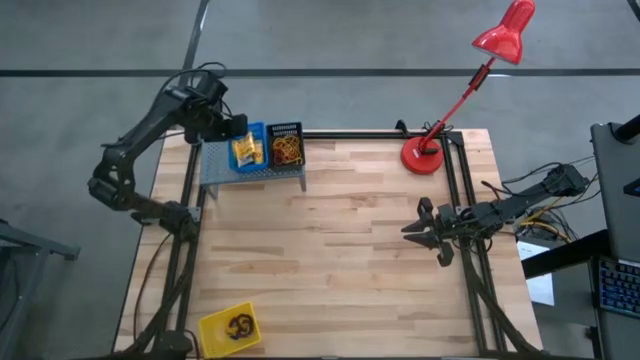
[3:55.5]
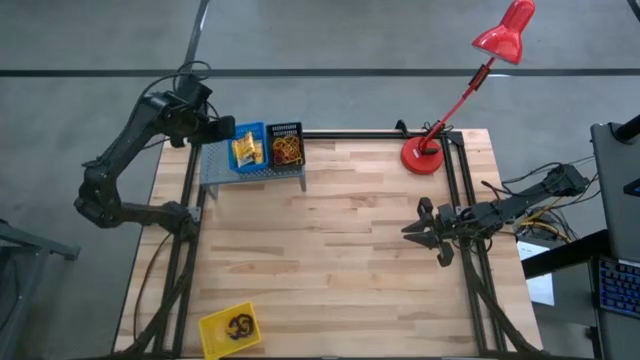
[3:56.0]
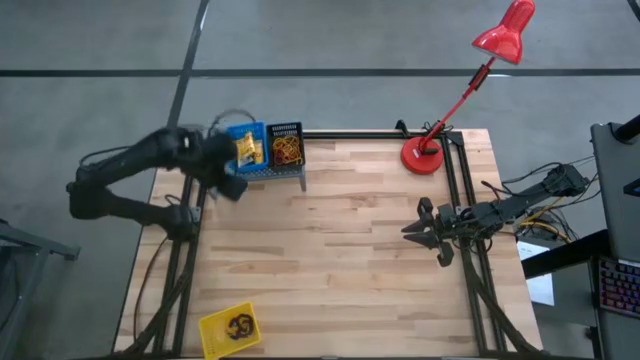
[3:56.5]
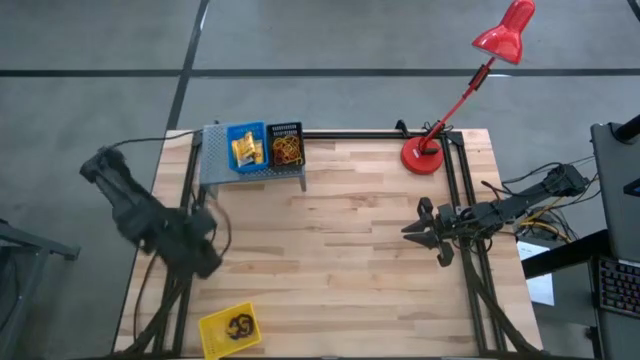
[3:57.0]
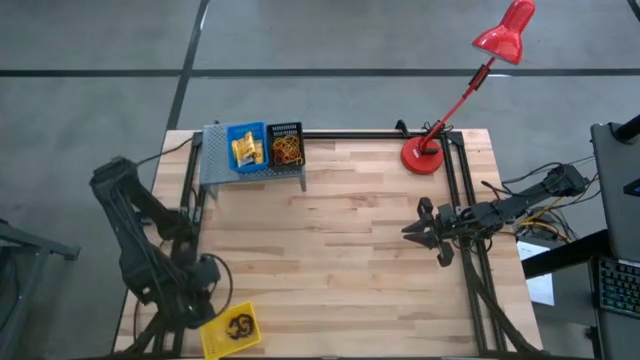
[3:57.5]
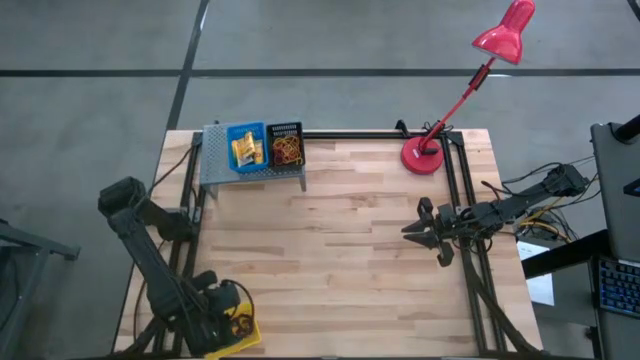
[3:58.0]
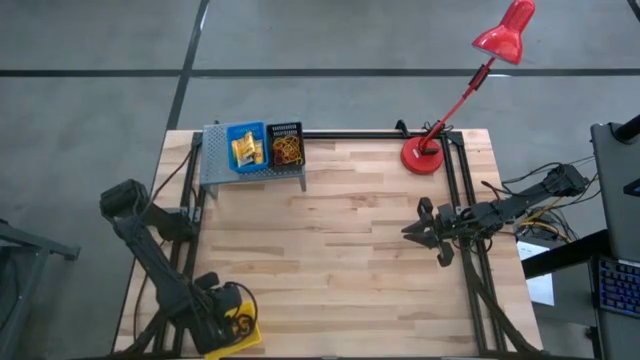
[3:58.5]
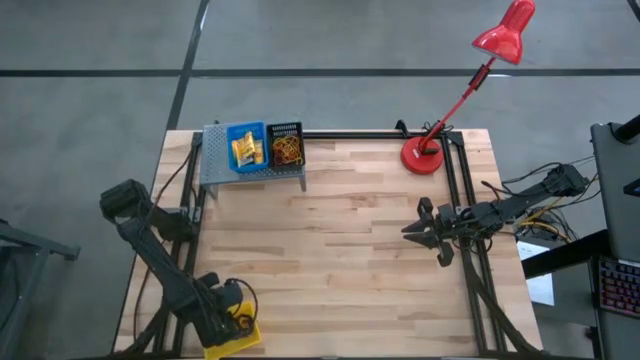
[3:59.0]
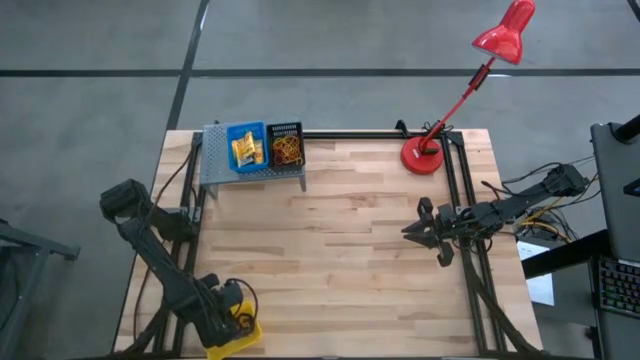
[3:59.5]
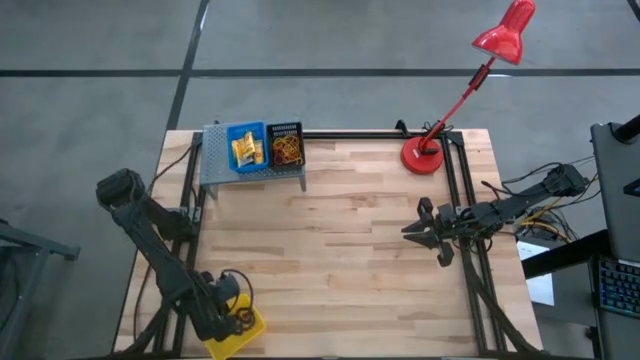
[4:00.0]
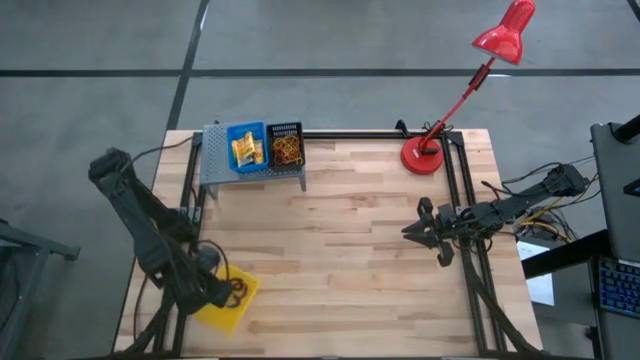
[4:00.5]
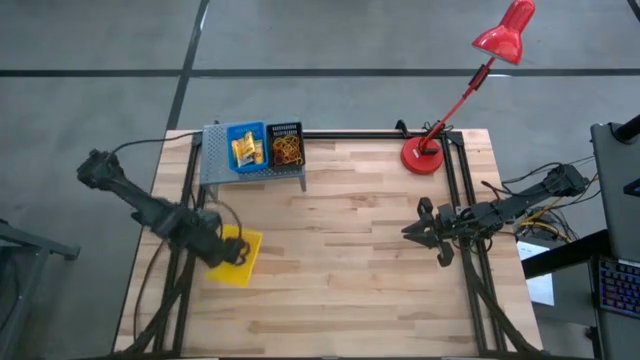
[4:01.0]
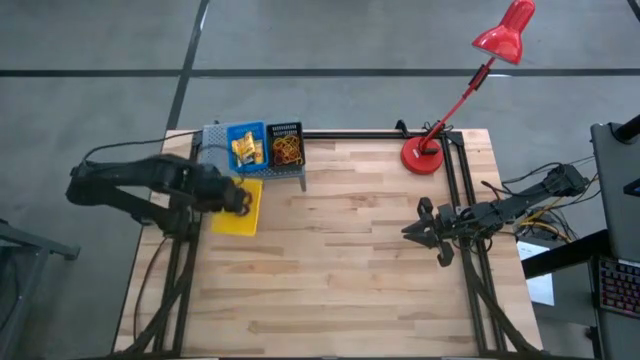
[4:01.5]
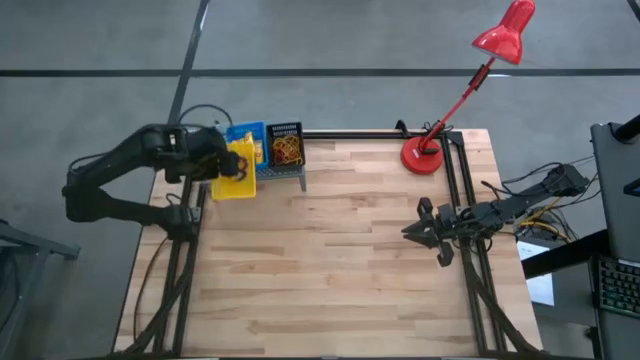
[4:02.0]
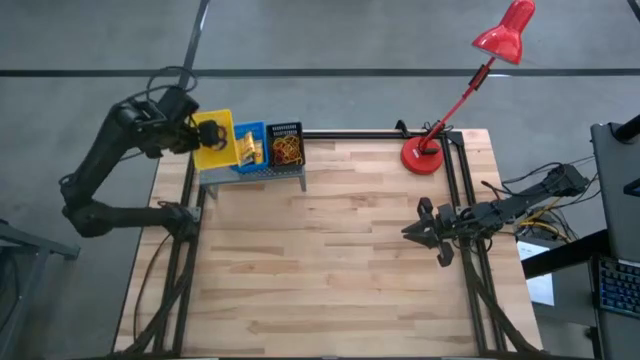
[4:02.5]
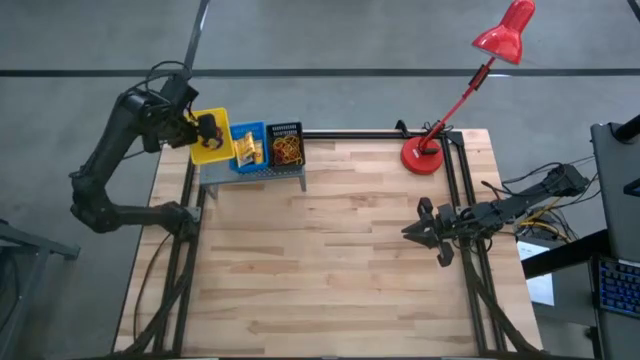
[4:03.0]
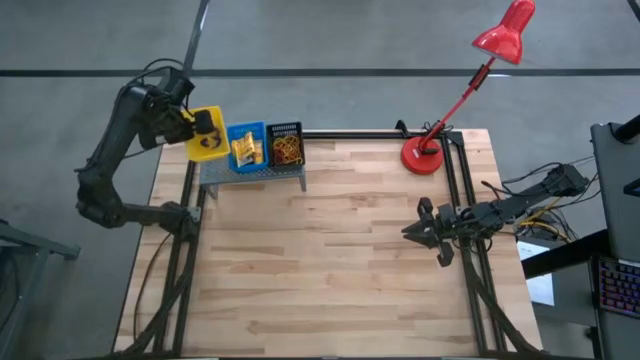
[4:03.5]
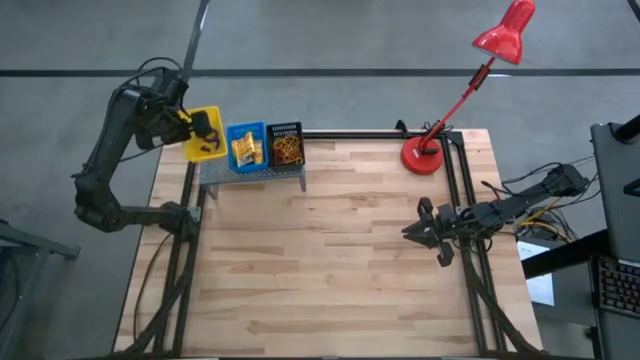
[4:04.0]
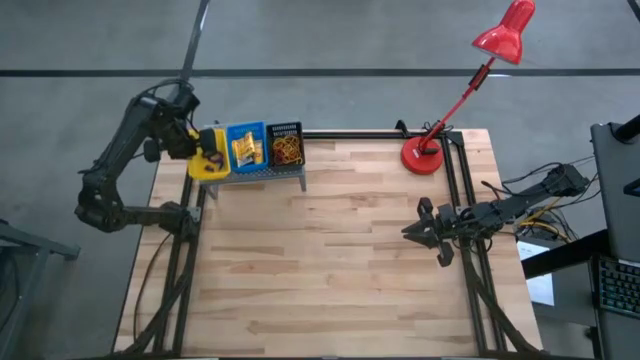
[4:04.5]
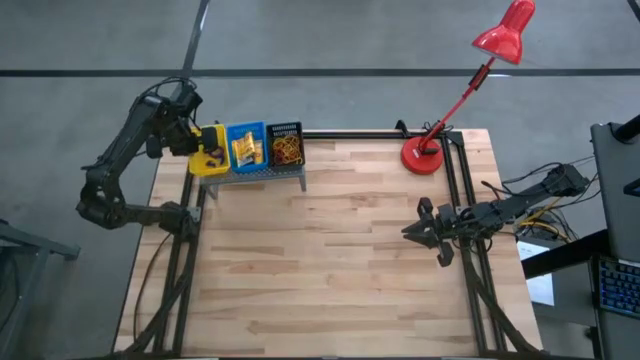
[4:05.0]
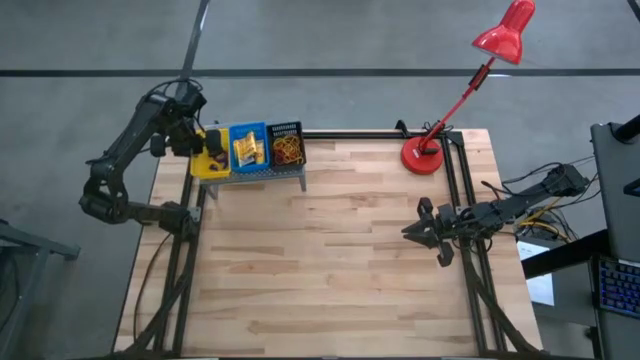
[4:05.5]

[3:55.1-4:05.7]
Task: Pick & Place Office Desk Supplies
Put the yellow bin with key chains on the shelf

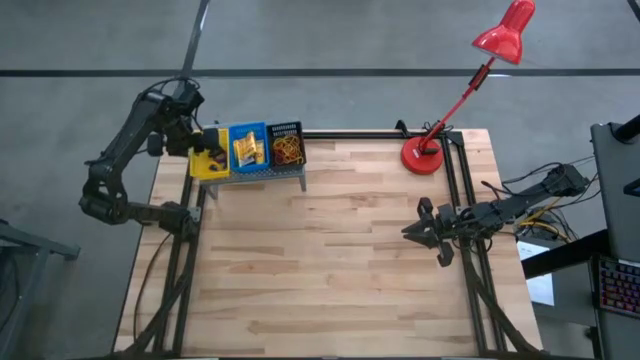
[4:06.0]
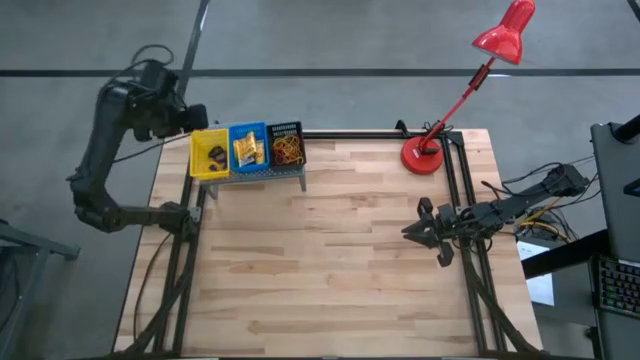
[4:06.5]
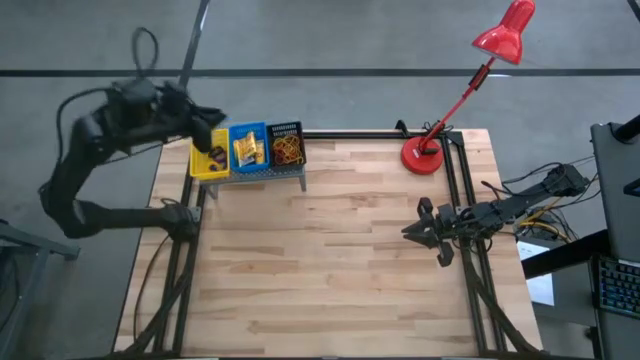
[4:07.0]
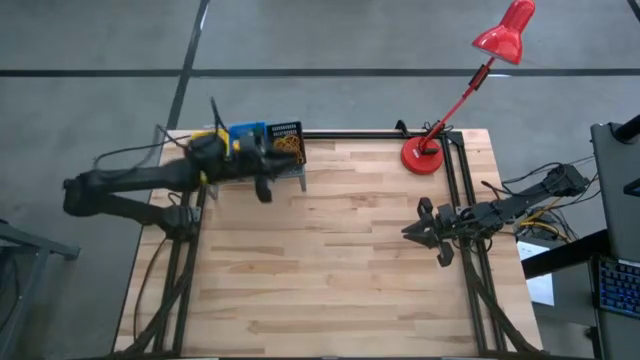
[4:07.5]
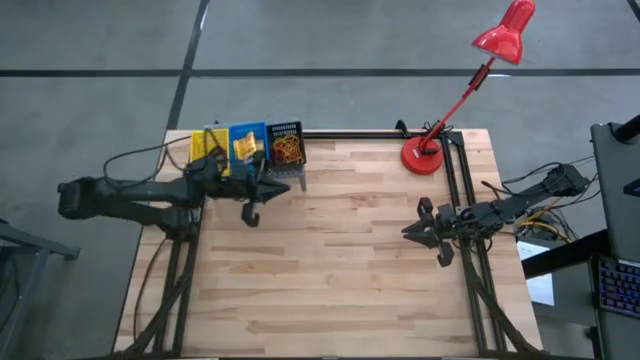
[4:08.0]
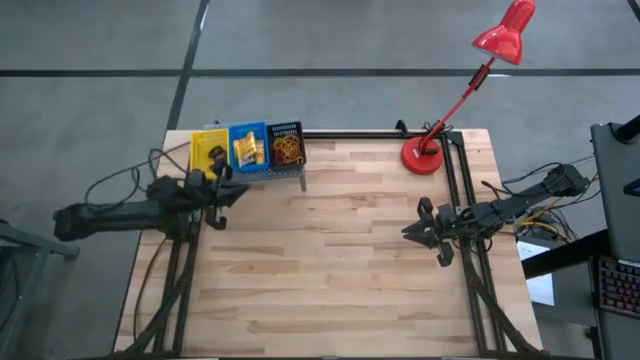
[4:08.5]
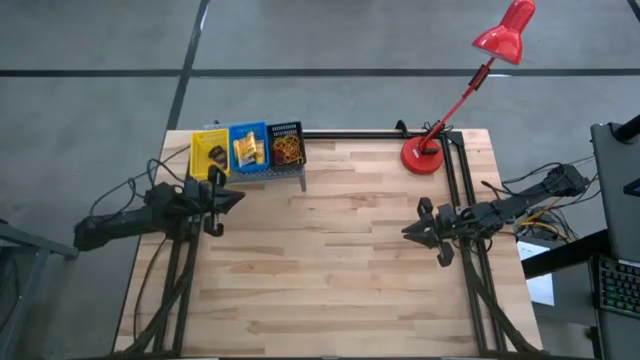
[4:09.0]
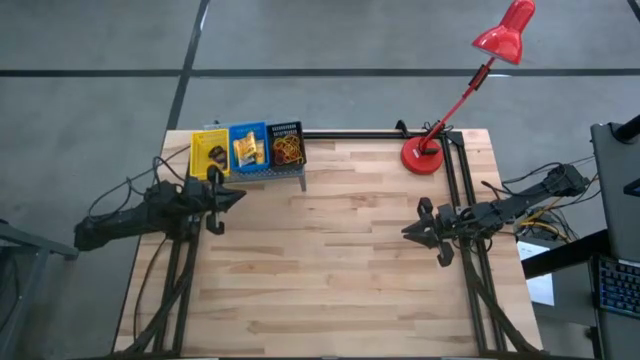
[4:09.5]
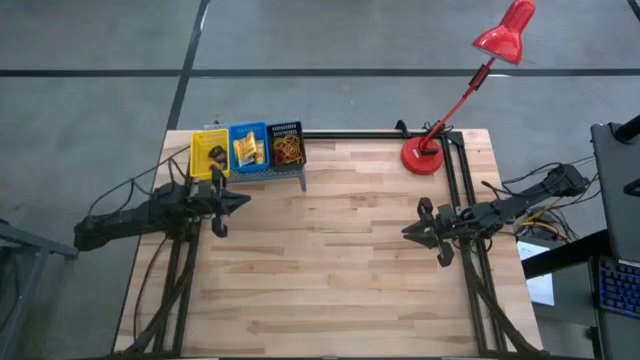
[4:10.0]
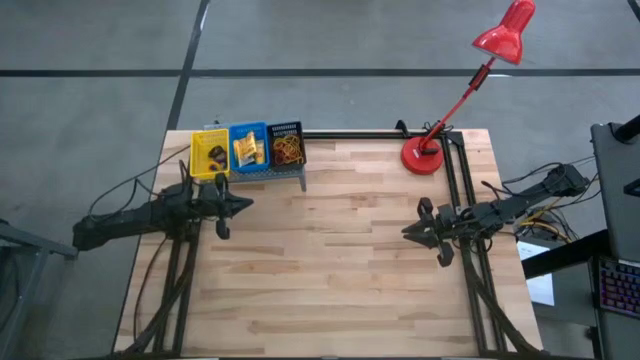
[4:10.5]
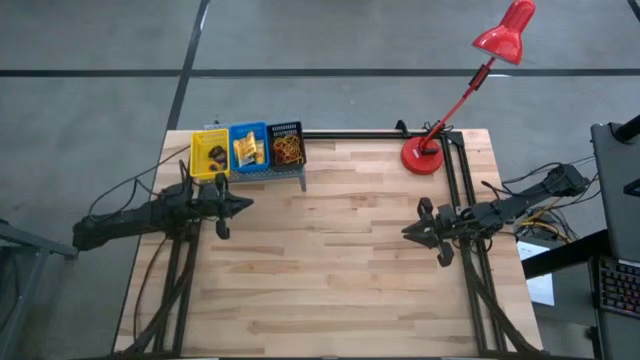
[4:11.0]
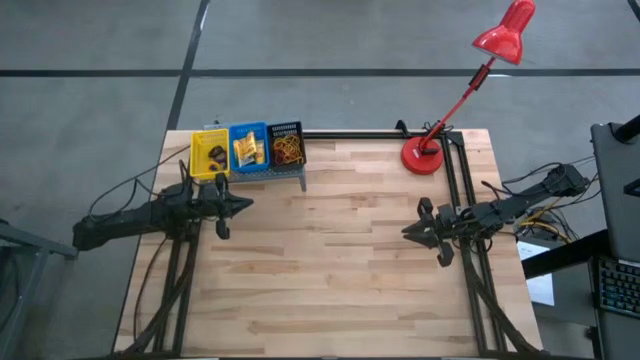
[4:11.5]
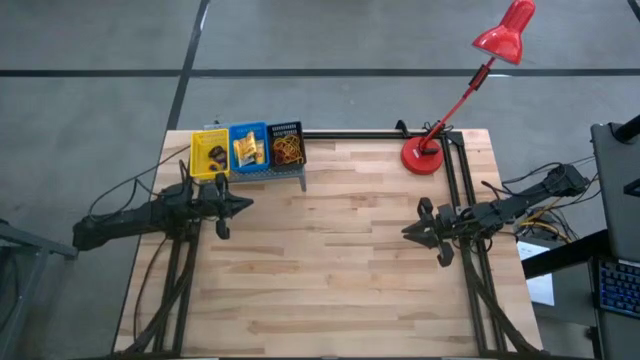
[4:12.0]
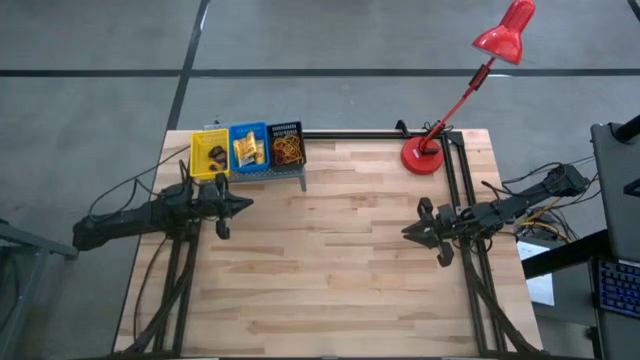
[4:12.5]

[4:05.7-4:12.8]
Return to Home Position

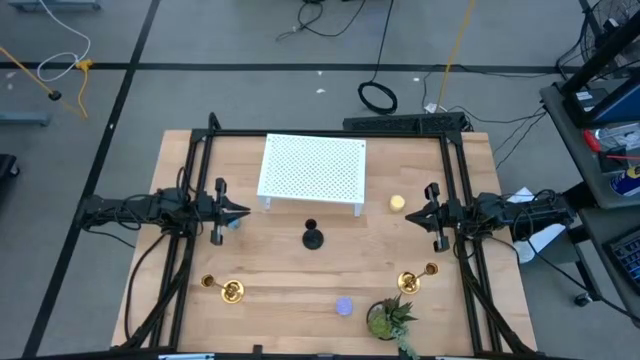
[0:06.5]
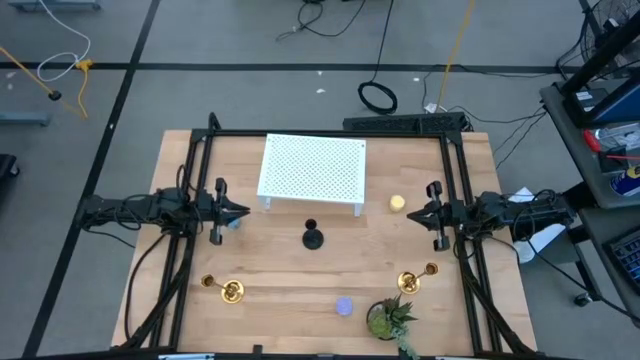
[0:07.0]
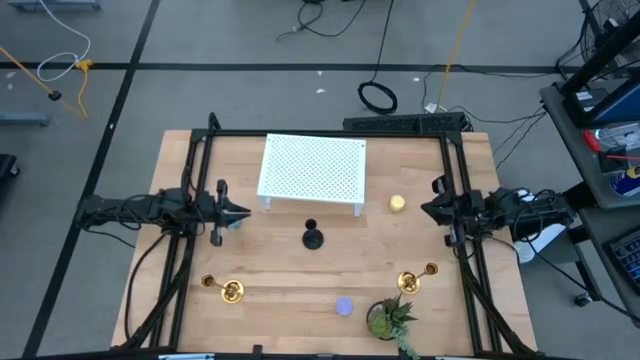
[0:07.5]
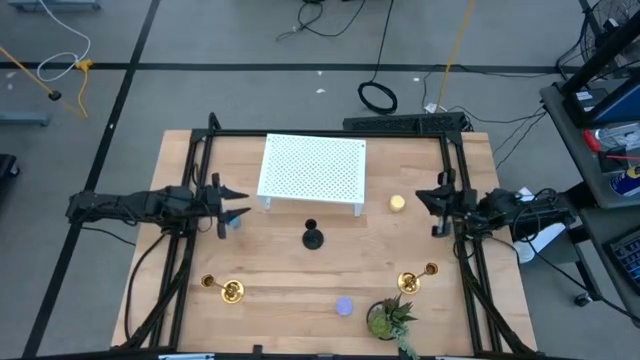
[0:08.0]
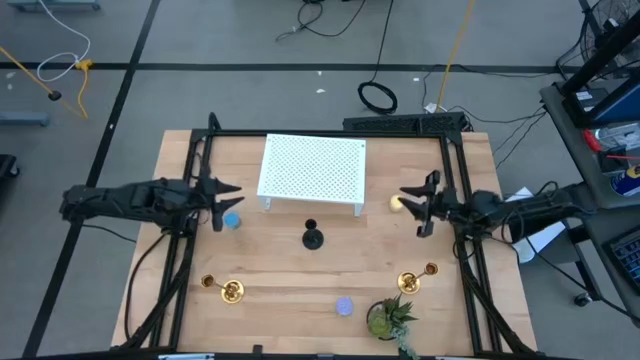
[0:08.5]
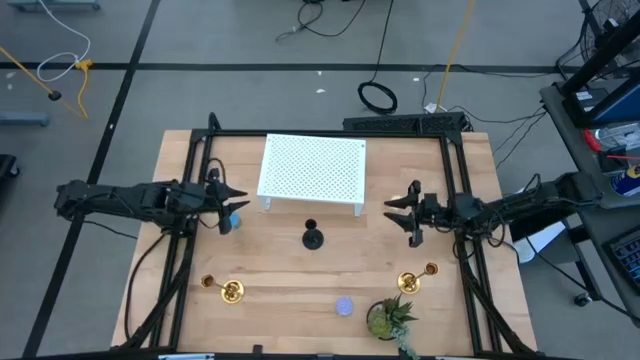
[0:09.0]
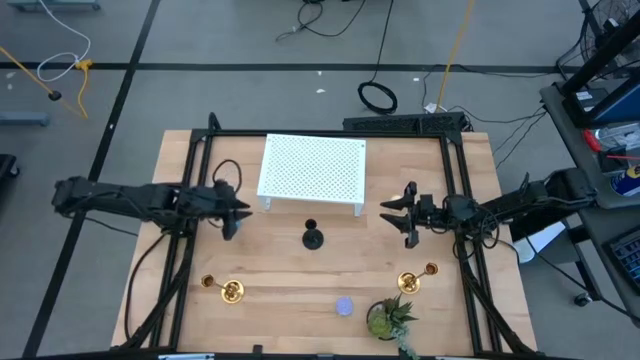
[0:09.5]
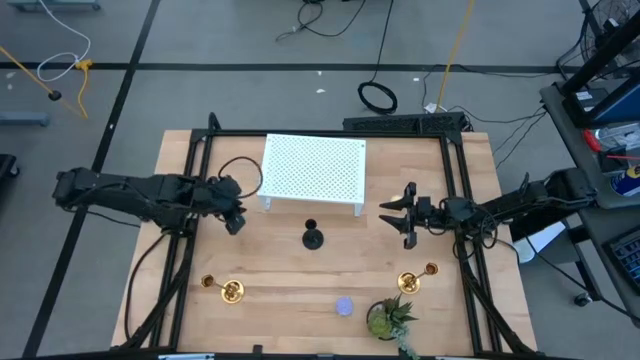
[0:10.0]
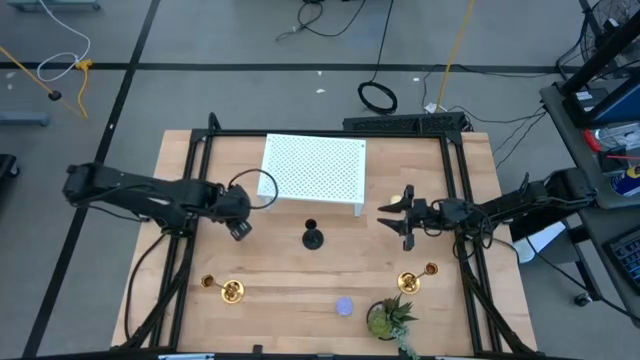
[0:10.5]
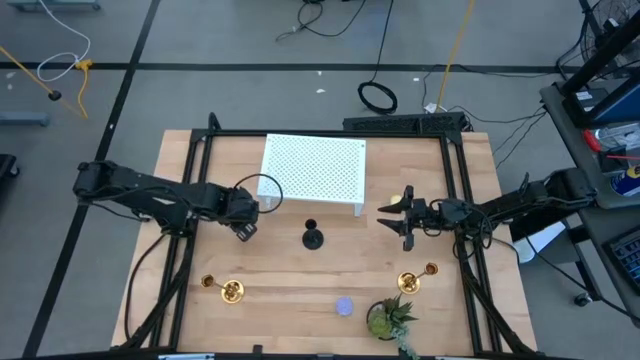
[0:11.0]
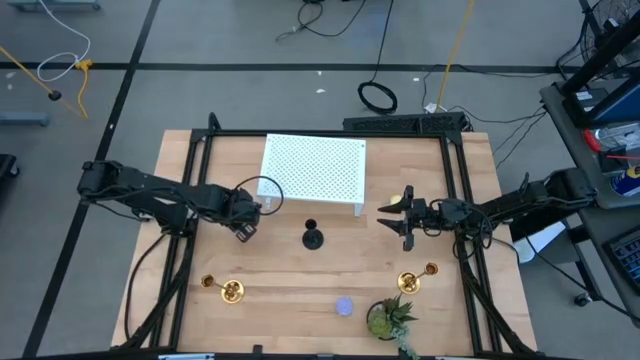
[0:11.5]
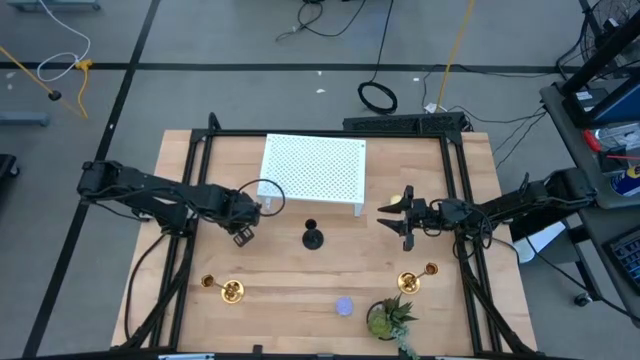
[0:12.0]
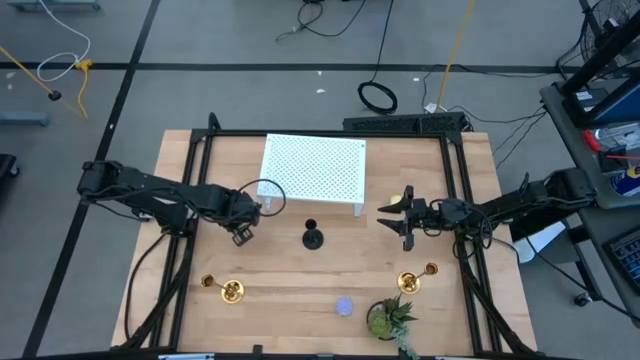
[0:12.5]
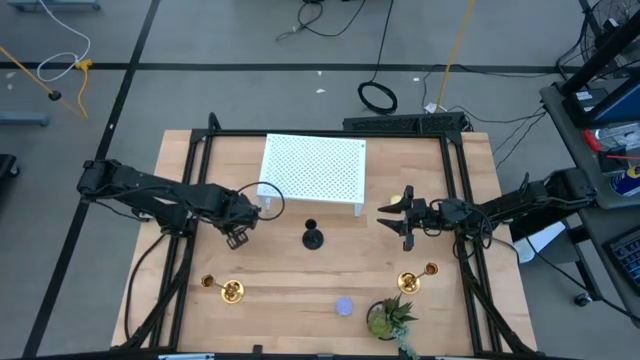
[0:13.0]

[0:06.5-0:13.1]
Task: Pick & Place candle stick holders
Put the blue scented candle on the shelf
